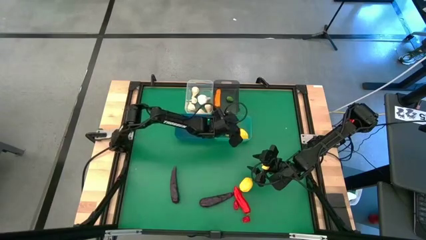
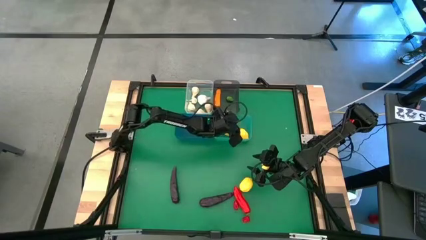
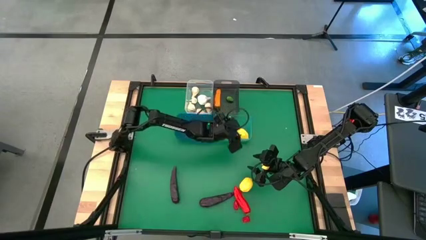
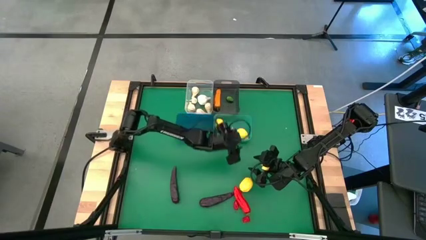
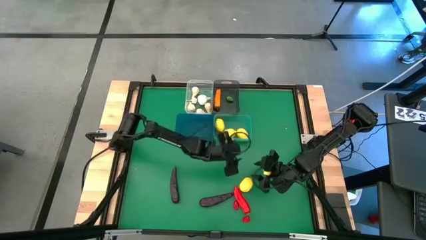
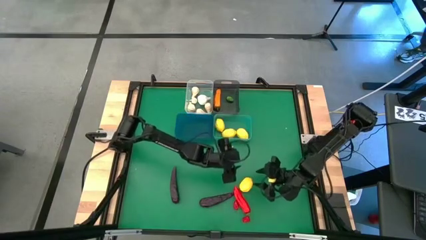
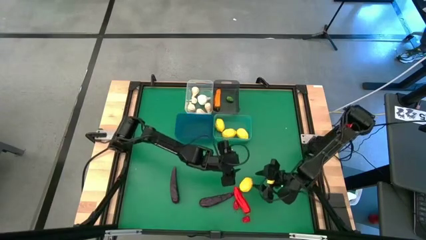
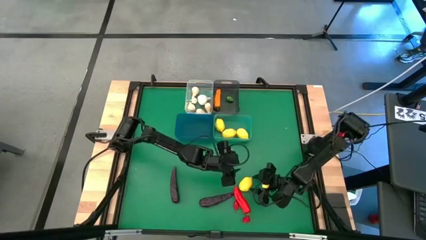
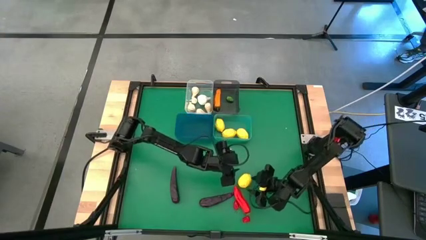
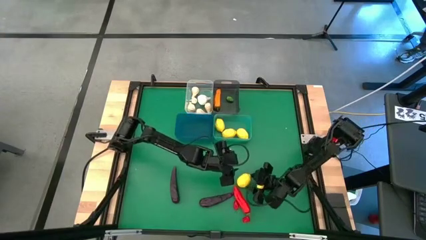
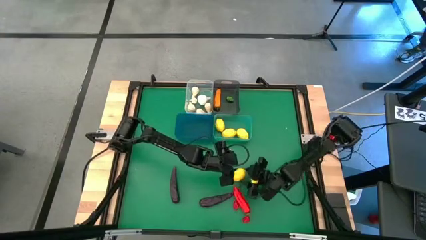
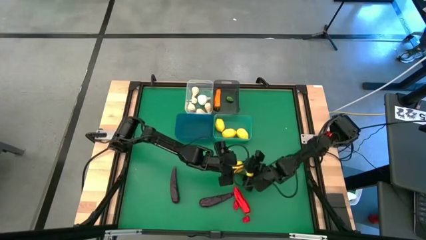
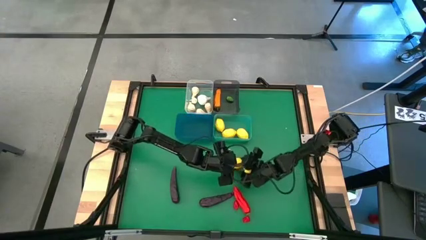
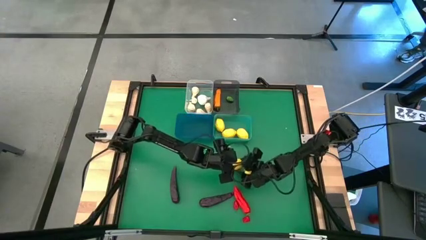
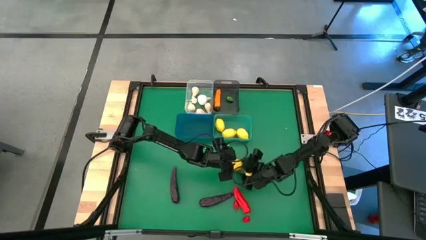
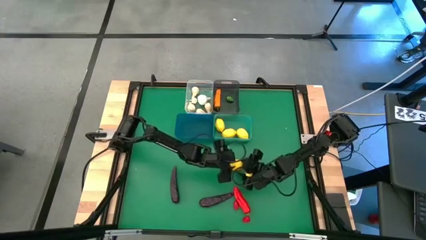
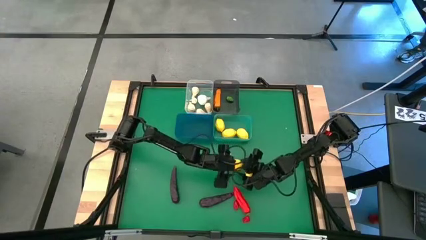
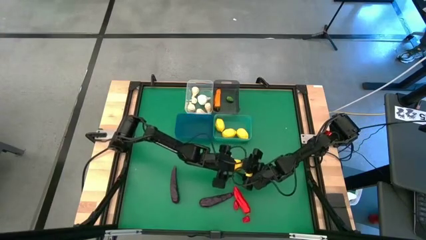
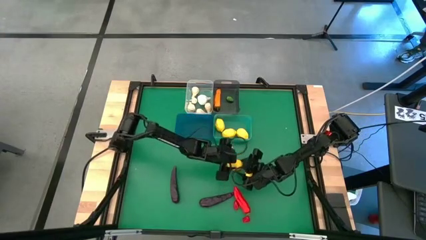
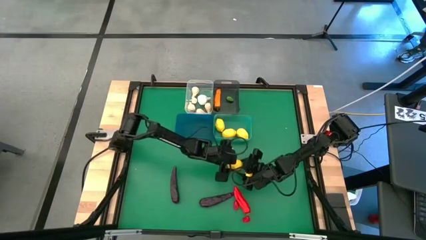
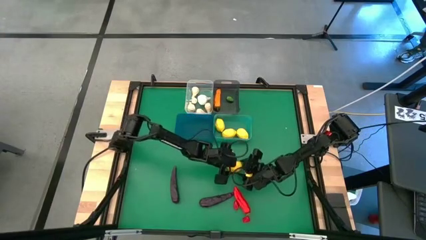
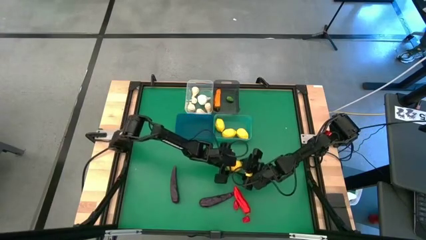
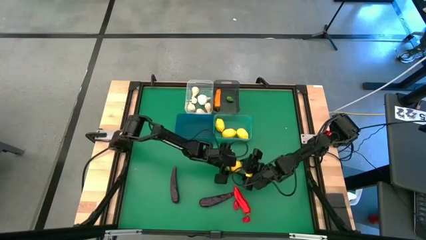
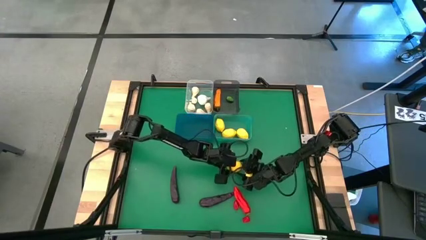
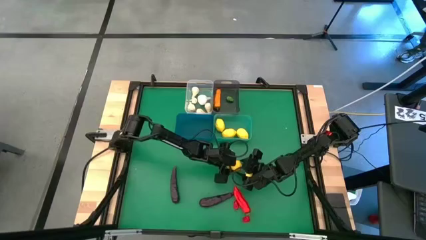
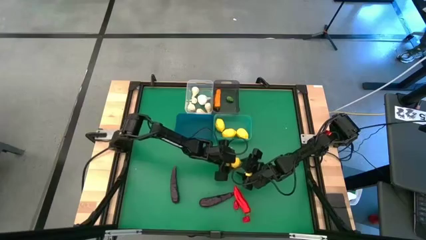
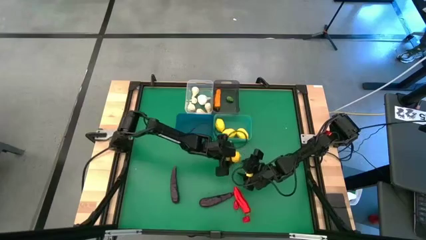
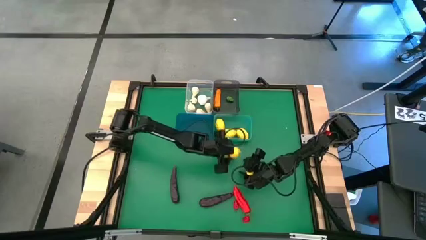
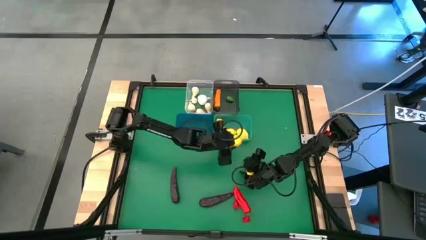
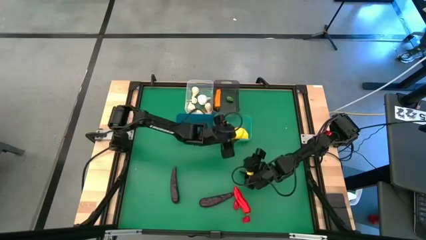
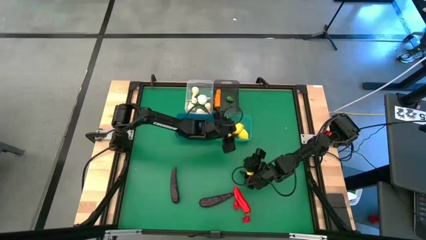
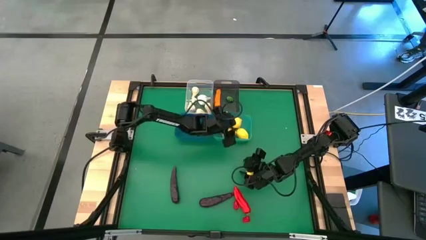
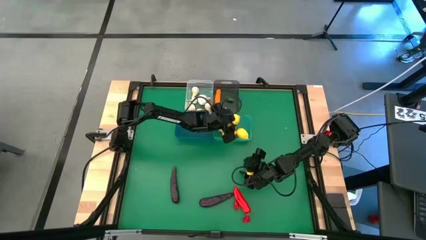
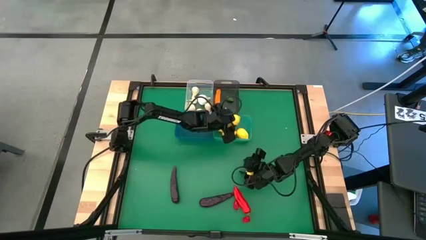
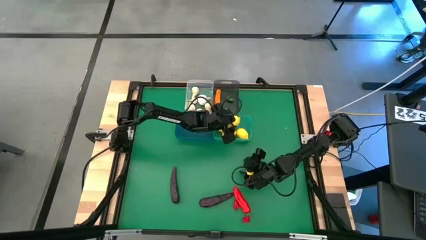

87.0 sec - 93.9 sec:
Task: Sort produce into baskets
Put the yellow lemon into the green bin

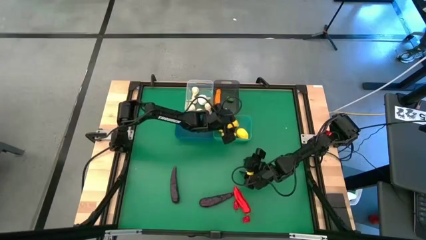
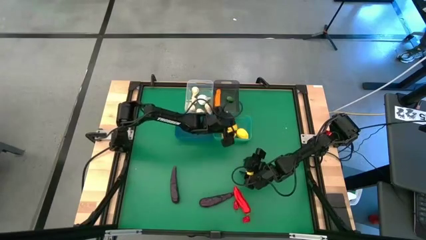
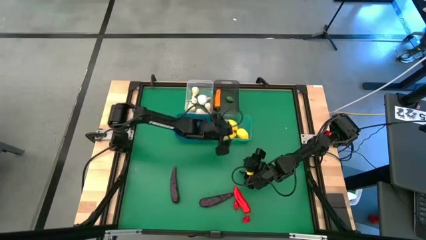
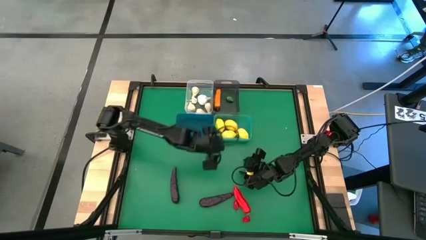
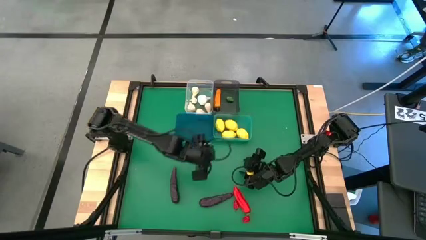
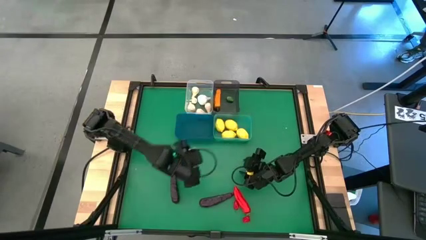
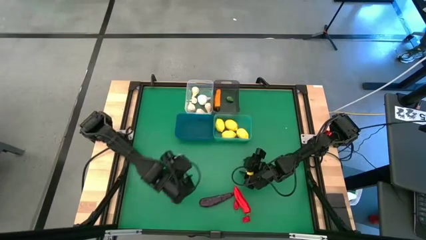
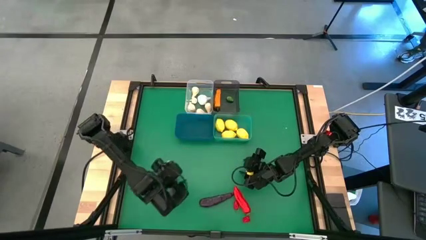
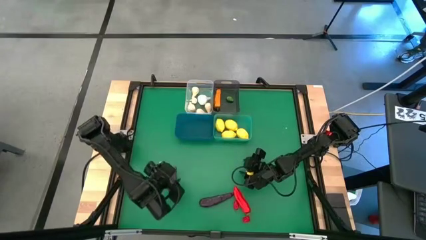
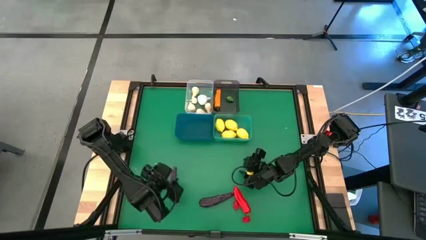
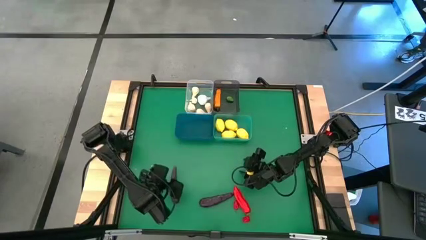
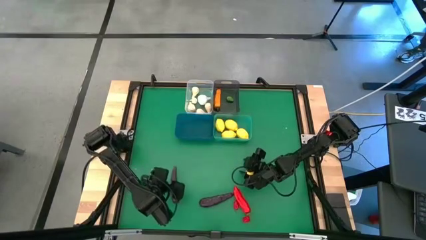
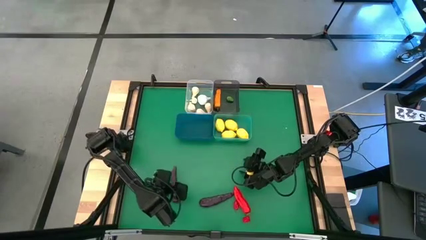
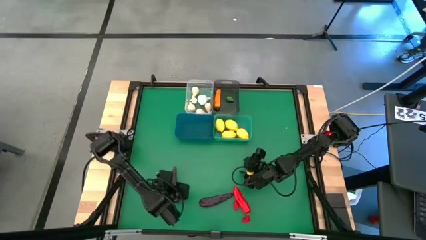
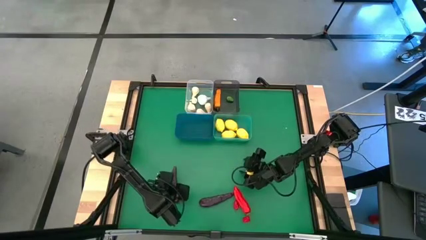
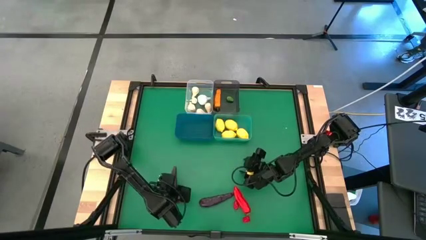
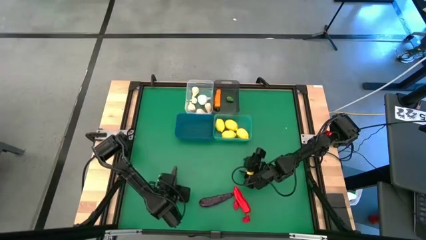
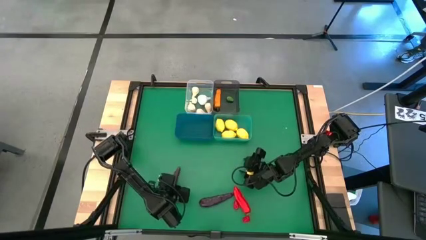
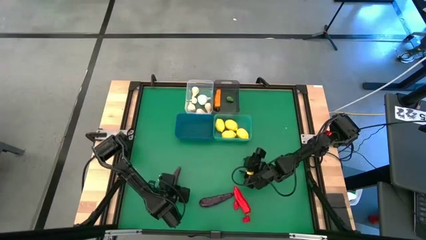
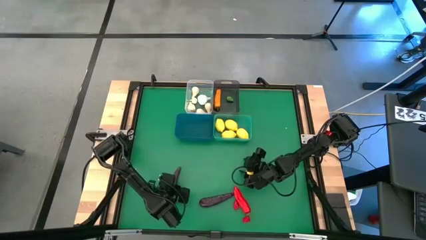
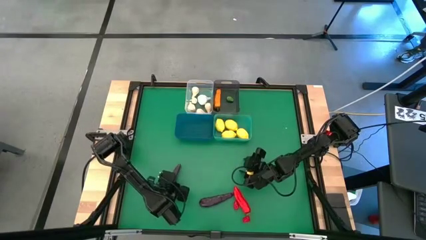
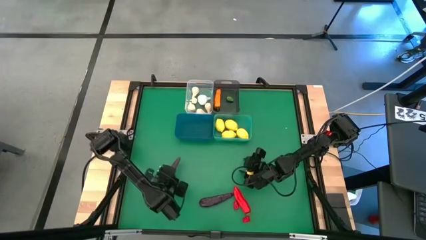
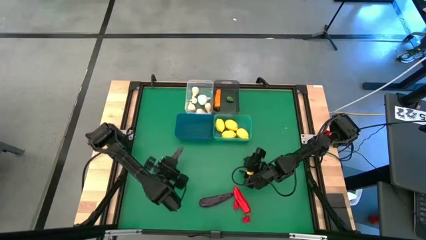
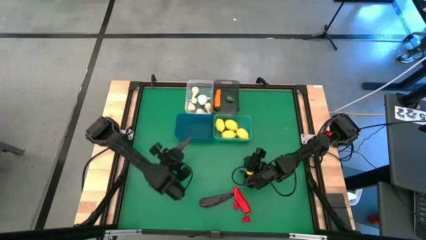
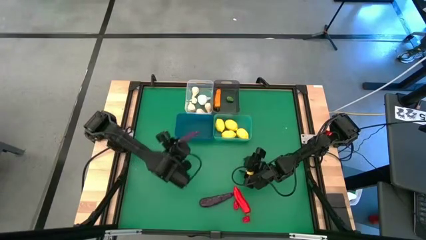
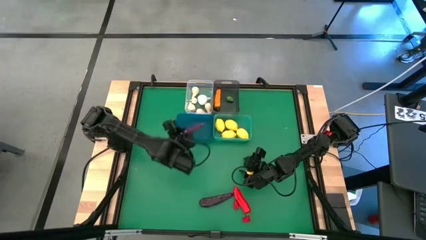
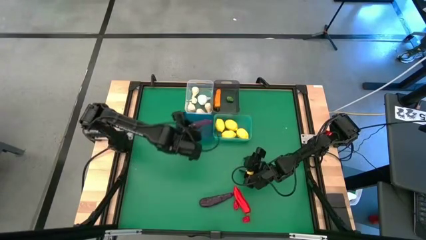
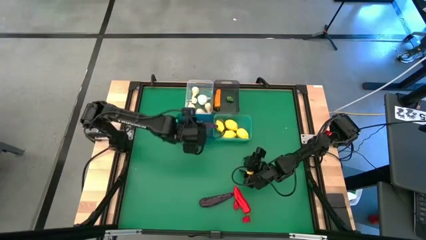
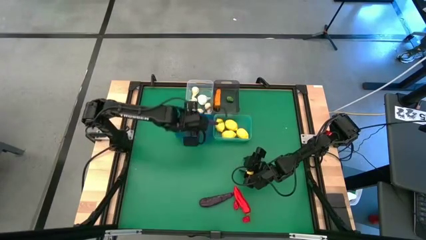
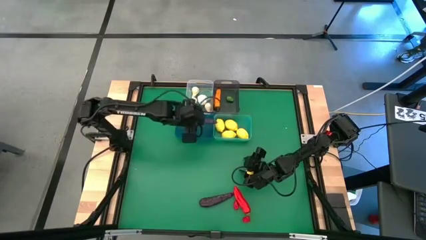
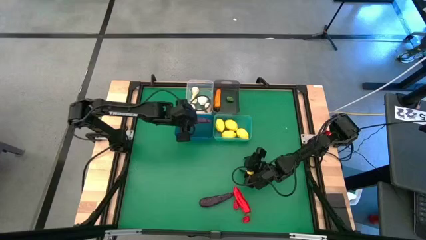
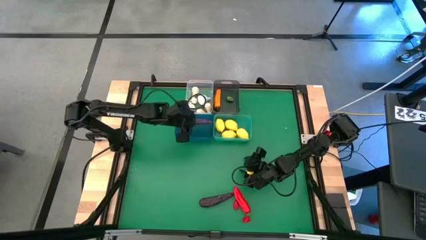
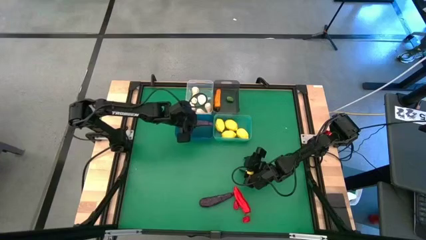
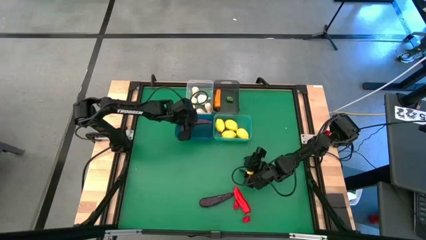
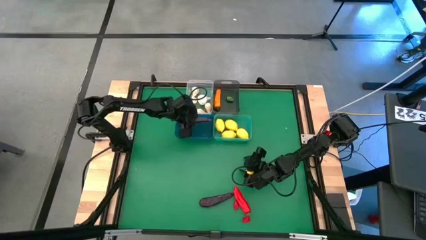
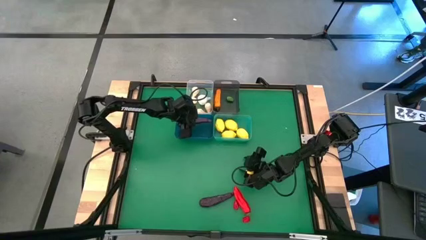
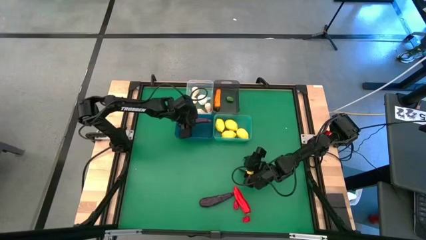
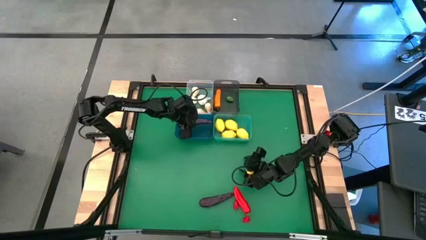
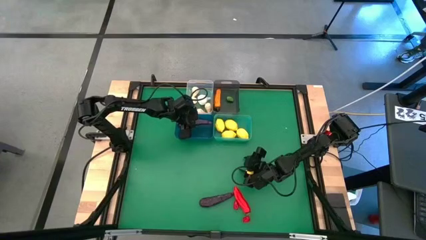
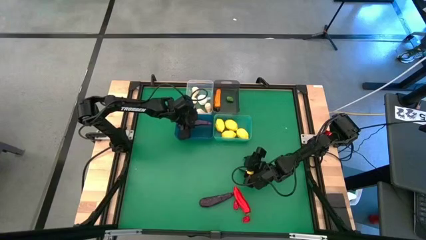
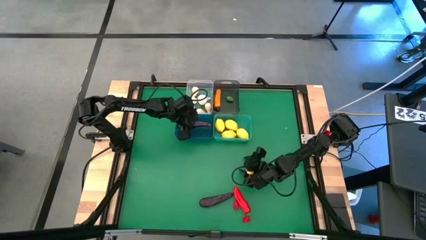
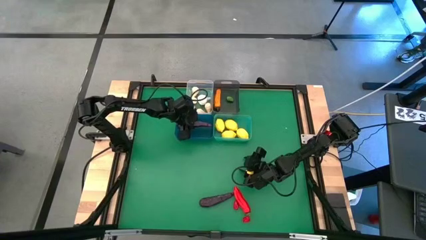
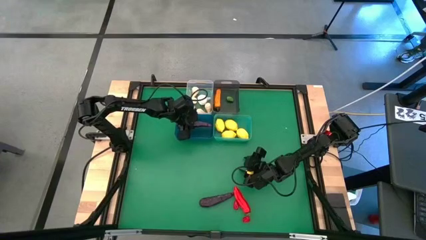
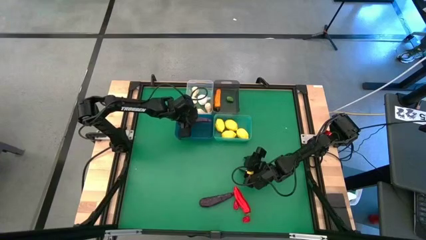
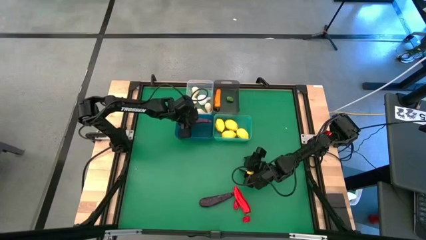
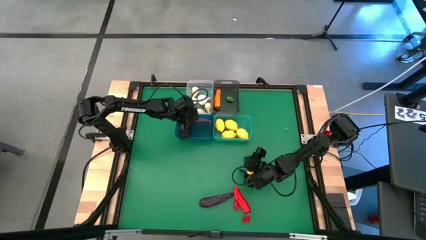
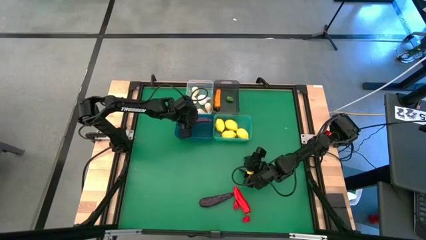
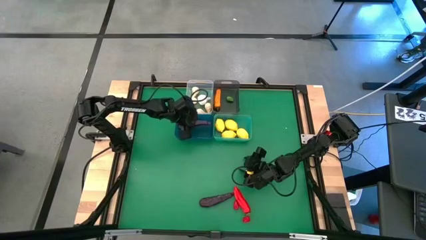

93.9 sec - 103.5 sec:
Put the violet eggplant into the blue bin

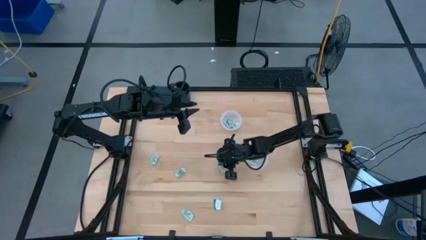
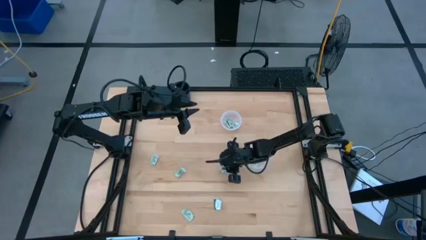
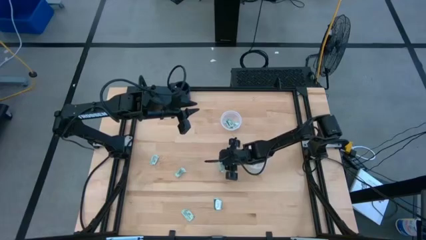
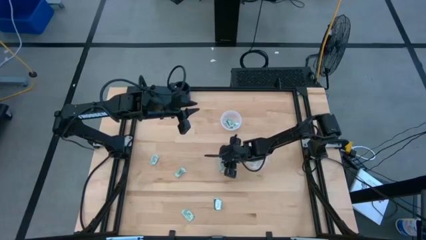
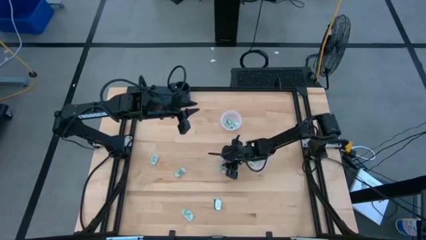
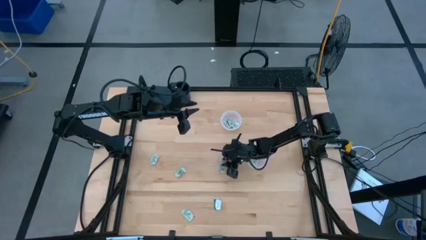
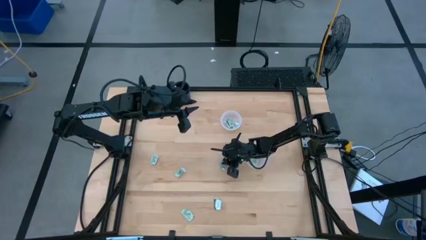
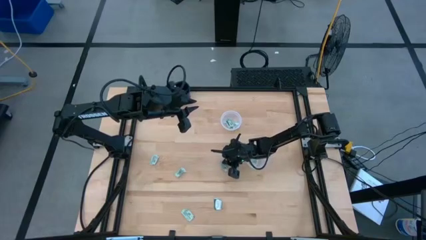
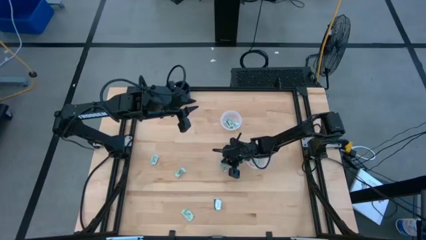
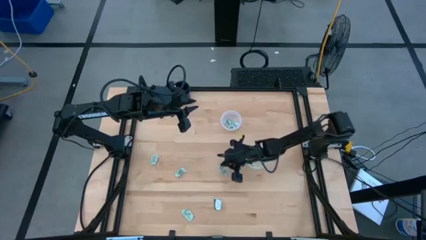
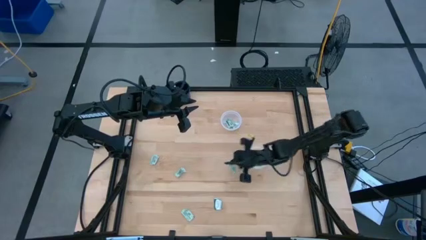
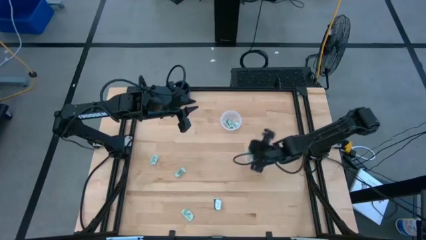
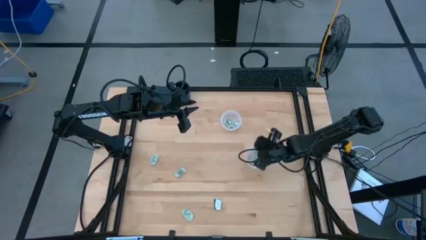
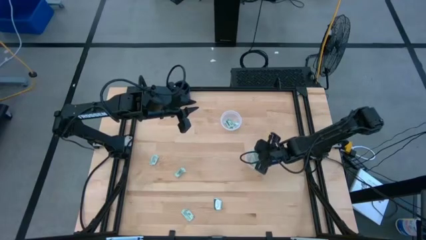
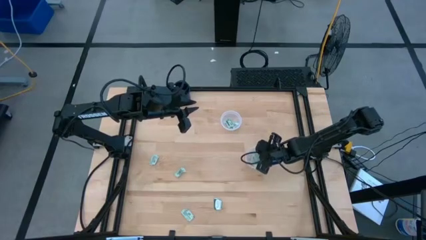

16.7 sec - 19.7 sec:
Task: Pick and place items into bin
Put the stevia packet into the bottom transparent bin
